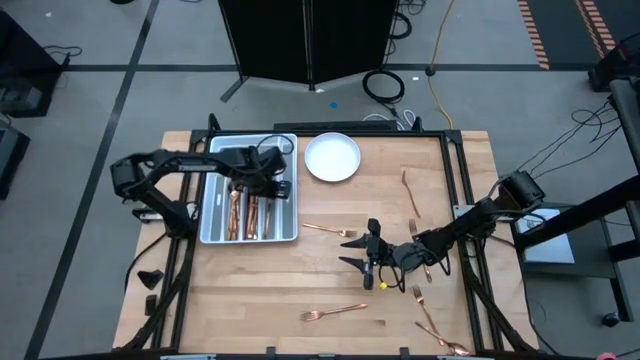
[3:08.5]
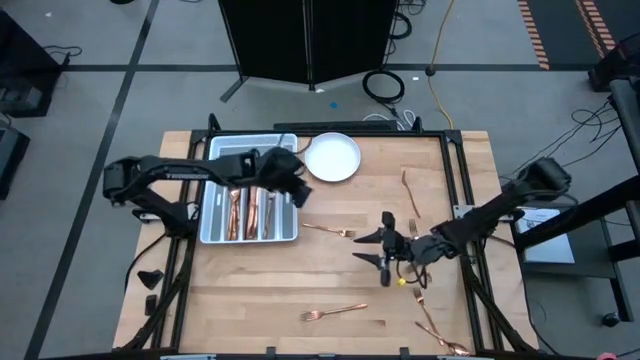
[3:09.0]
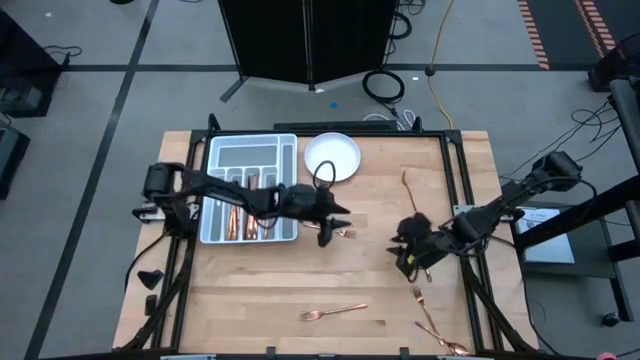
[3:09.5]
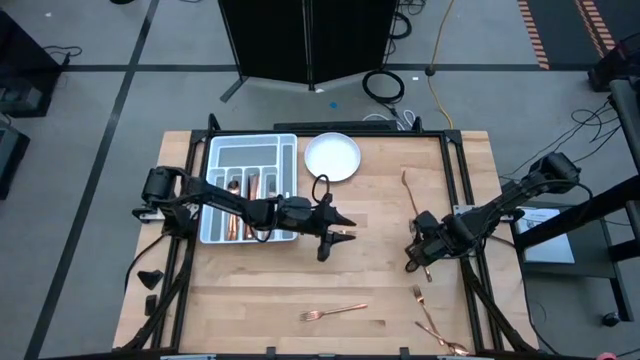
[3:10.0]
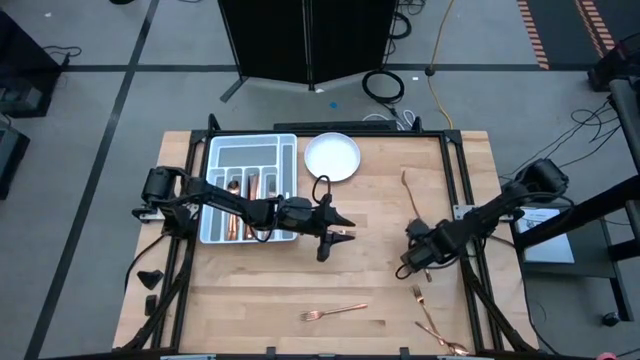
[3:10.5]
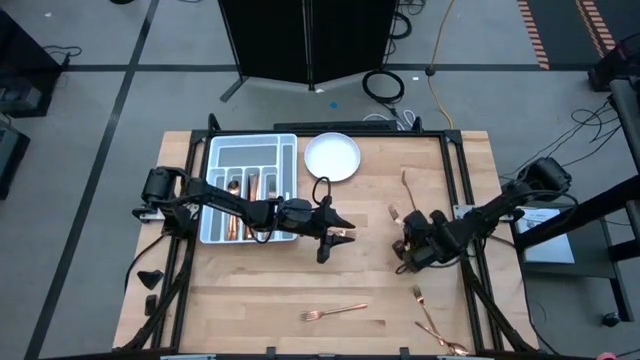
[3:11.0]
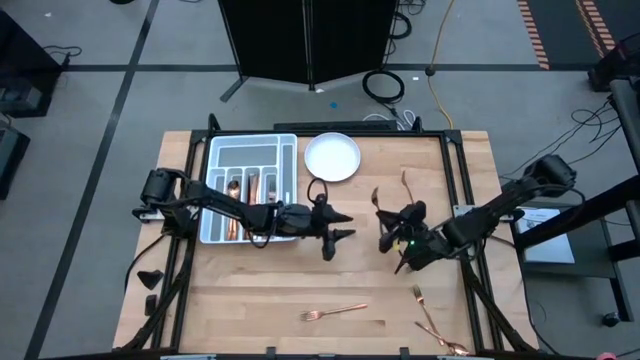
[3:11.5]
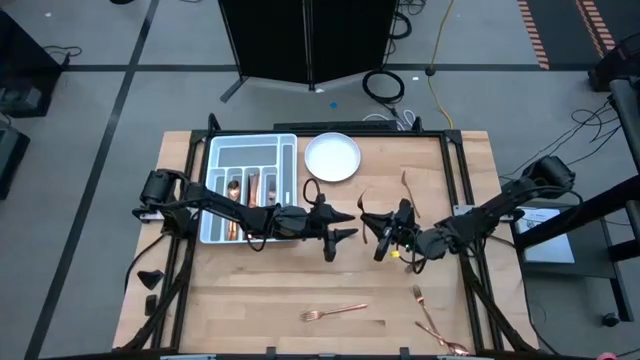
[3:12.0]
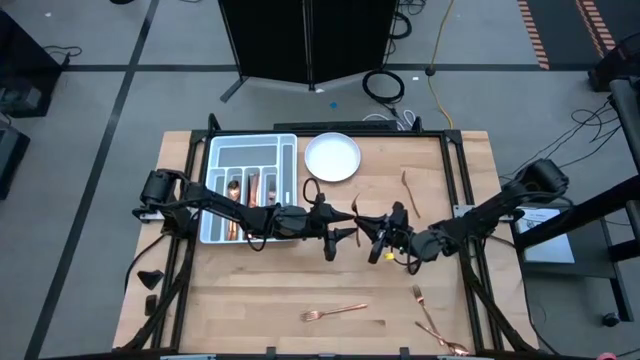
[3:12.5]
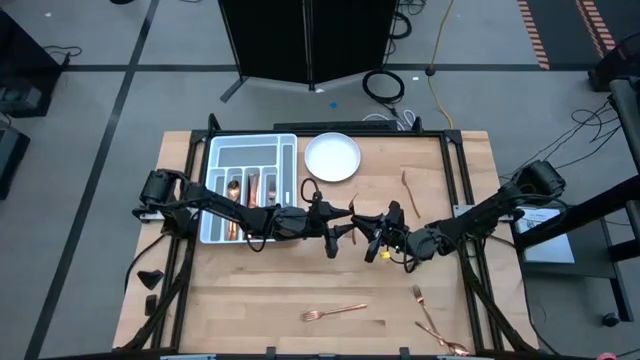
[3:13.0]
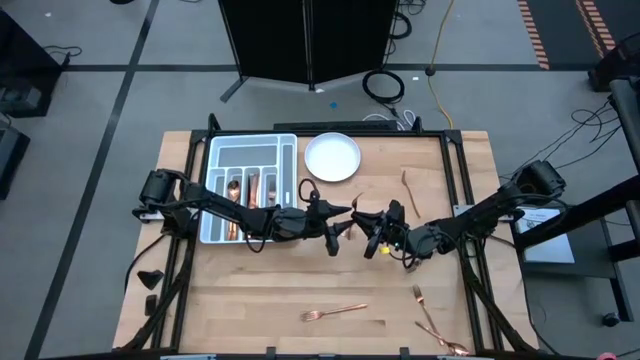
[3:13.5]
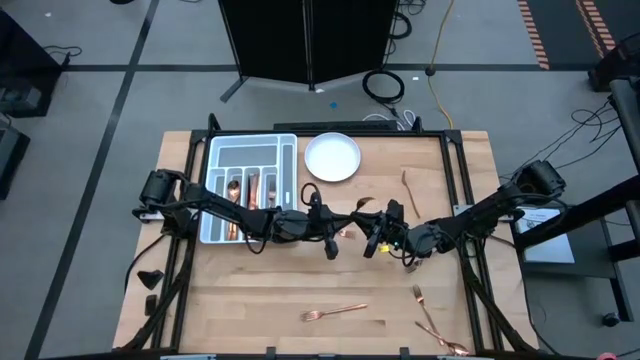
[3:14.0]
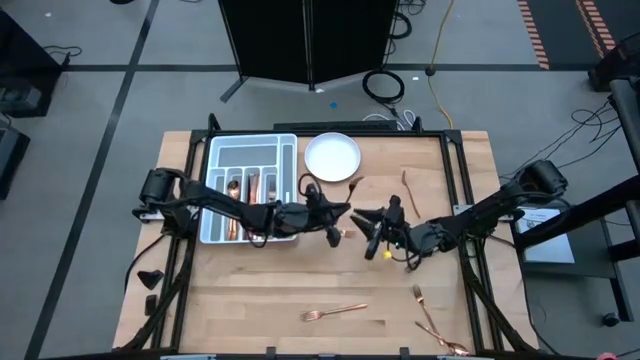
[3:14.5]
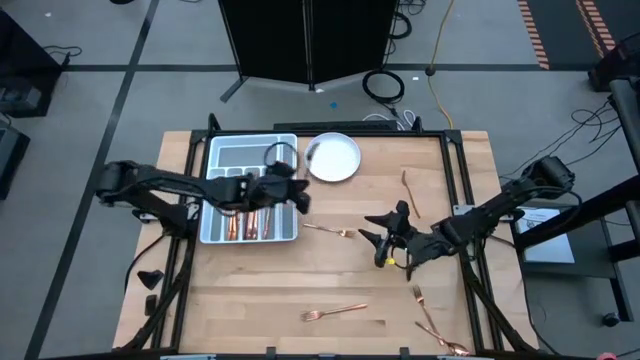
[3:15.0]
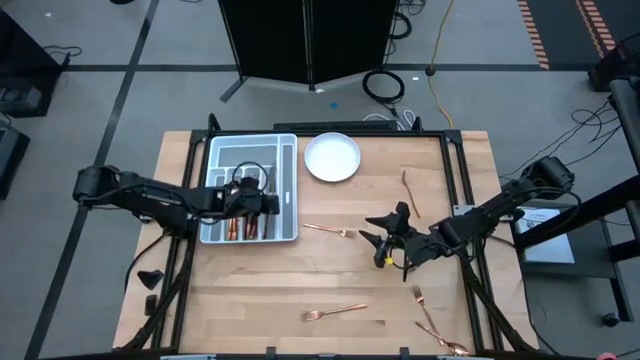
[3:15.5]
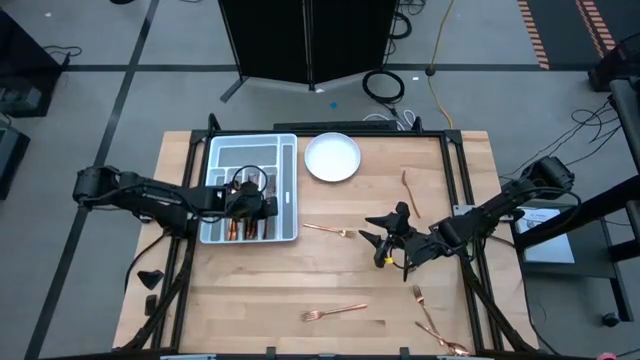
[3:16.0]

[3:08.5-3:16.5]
Task: Sort silverware
Put the fork on the silverware tray

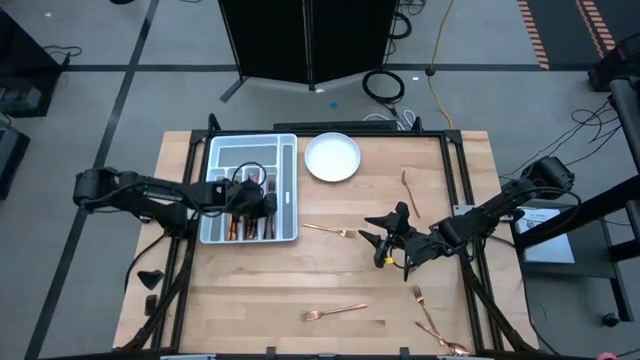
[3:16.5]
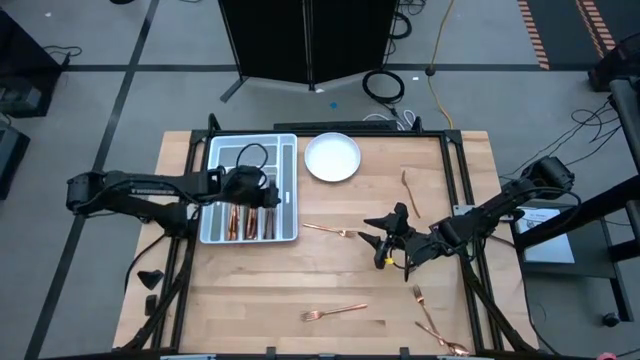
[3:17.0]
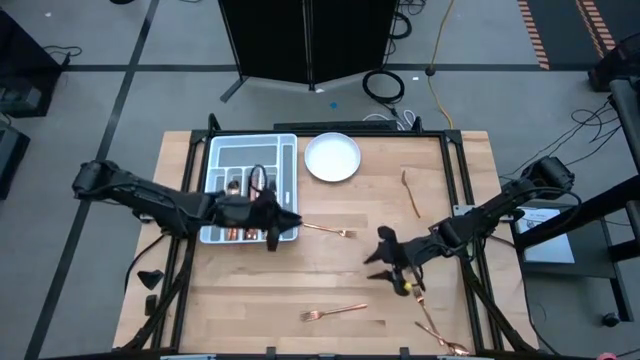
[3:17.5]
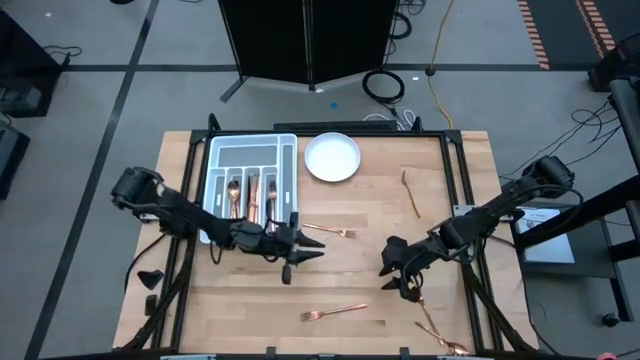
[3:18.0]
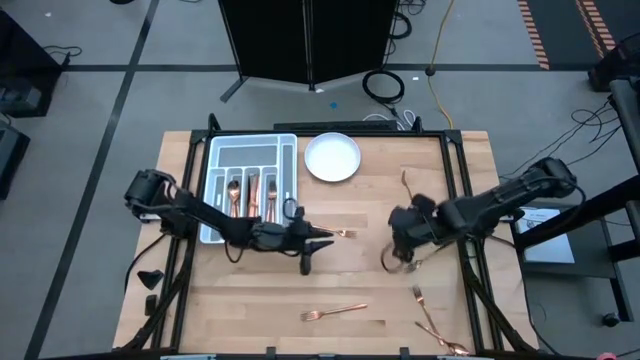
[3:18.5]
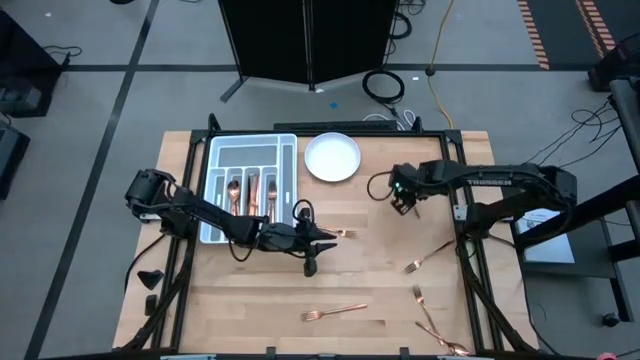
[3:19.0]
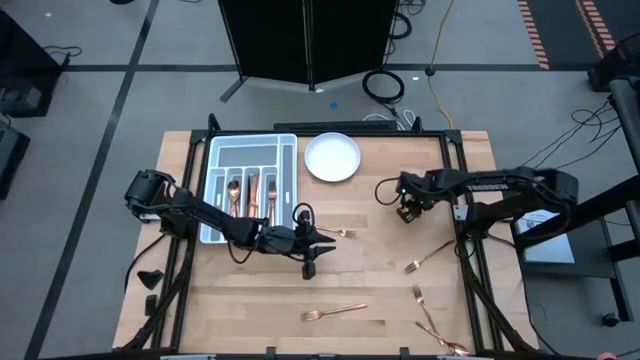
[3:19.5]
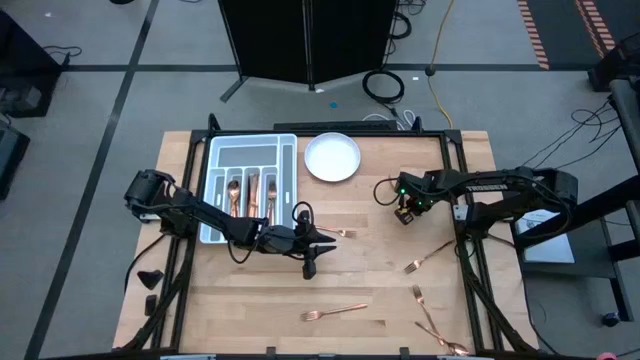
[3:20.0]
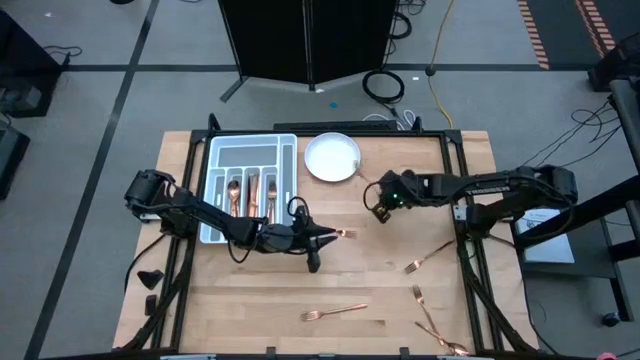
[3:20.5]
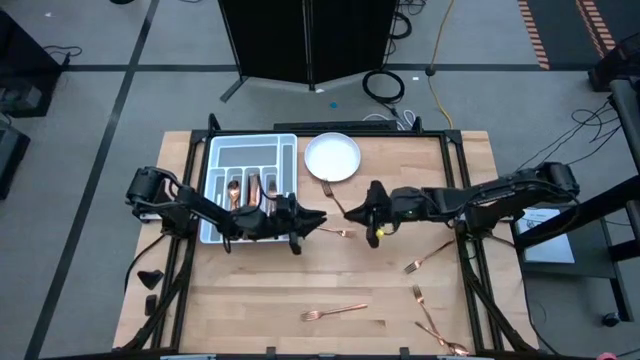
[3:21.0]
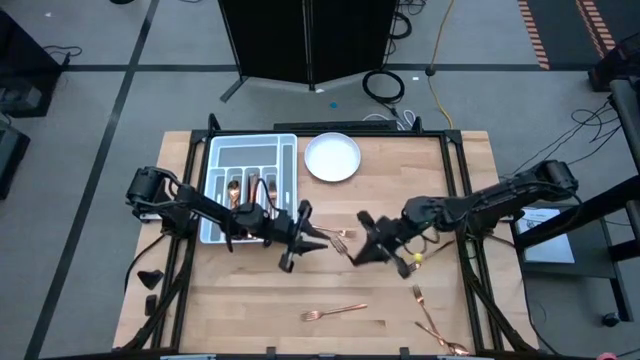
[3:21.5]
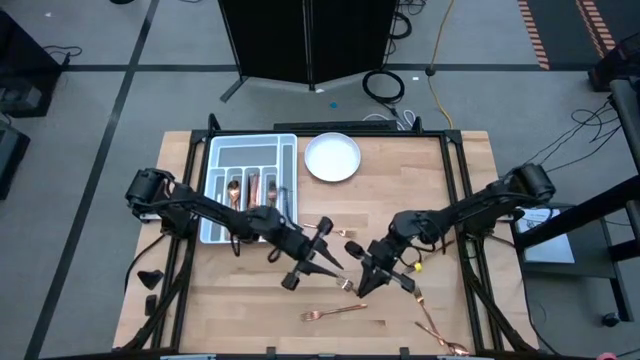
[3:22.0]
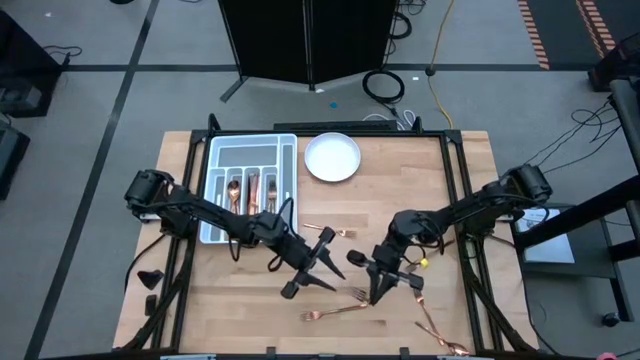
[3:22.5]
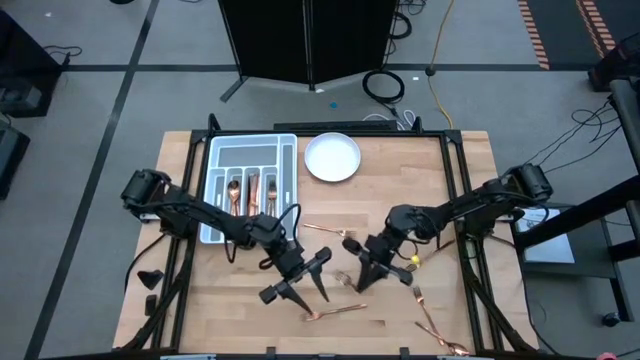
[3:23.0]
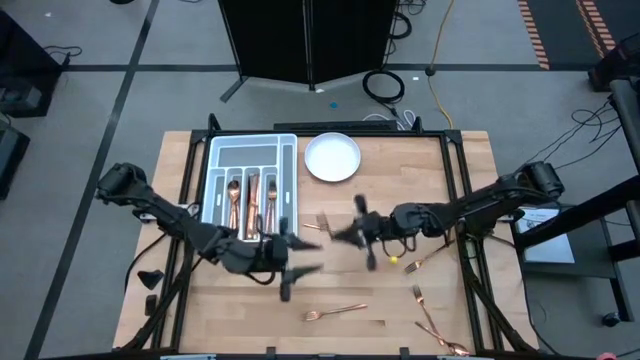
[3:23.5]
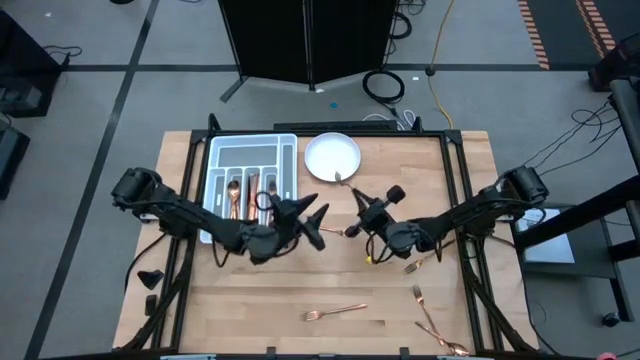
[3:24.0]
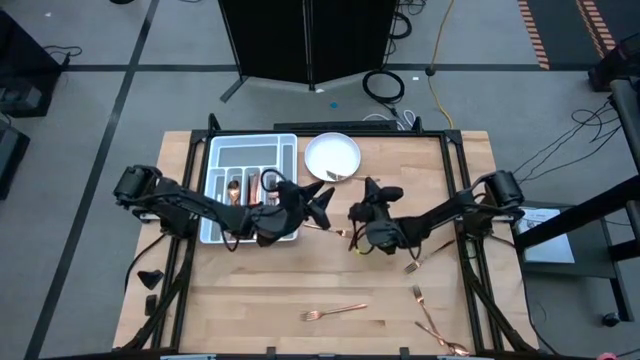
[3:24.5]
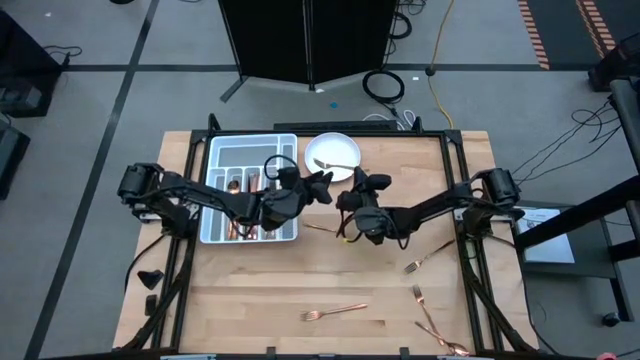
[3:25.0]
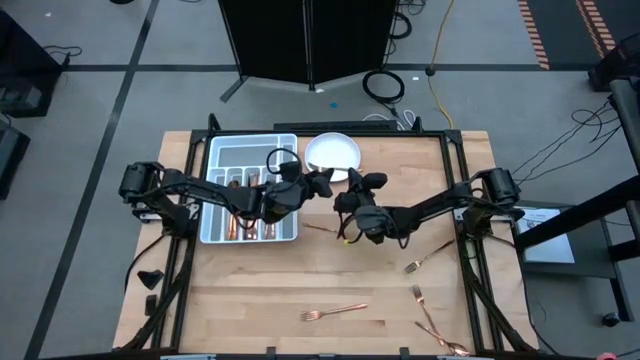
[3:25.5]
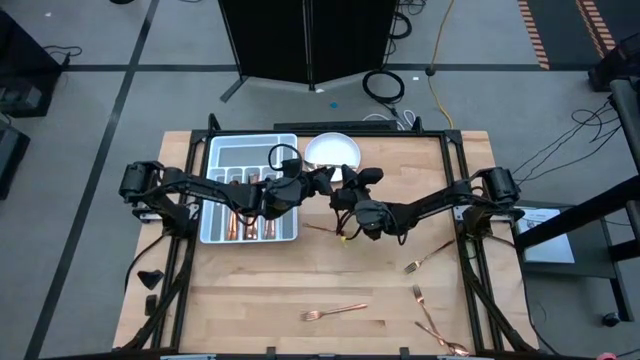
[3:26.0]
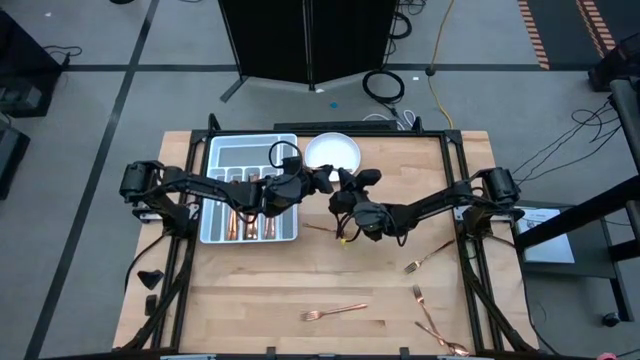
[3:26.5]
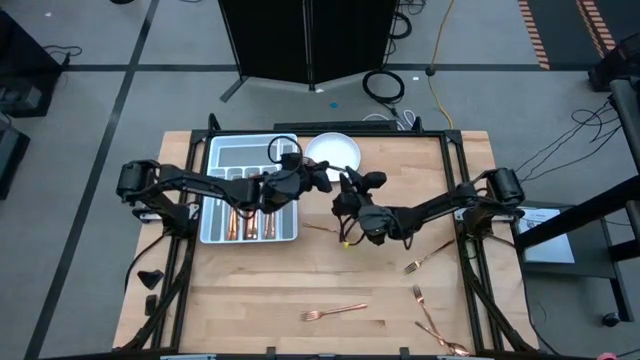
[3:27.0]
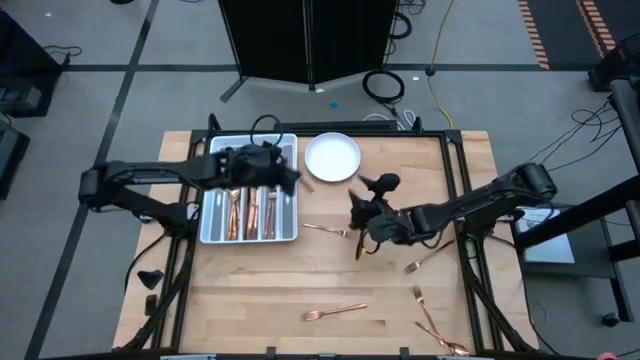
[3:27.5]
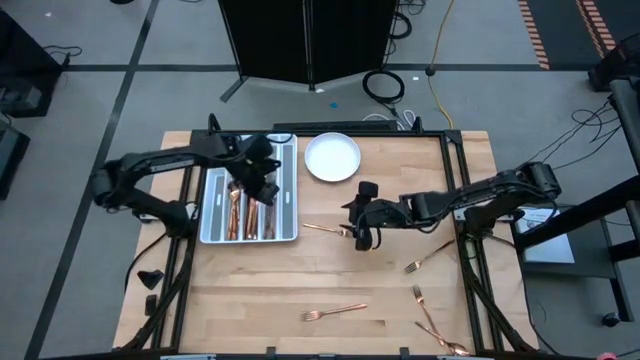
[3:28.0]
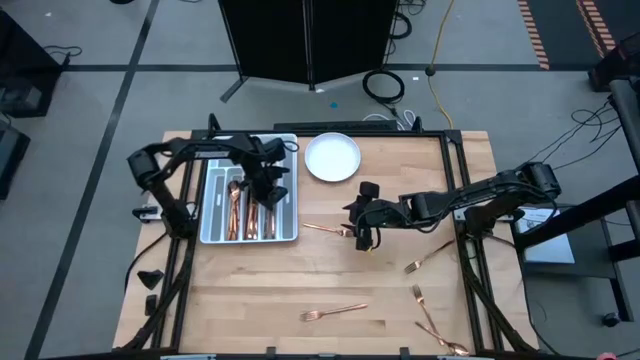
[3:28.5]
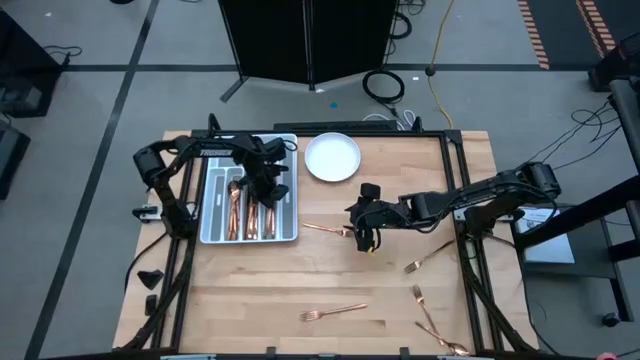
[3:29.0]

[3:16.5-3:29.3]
Put the fork on the silverware tray
